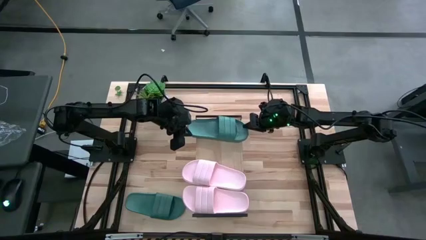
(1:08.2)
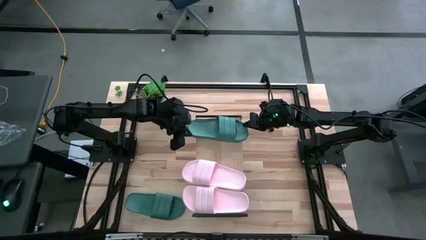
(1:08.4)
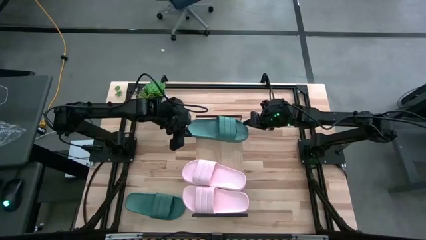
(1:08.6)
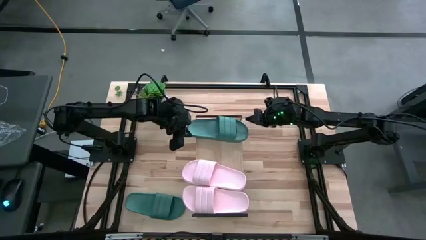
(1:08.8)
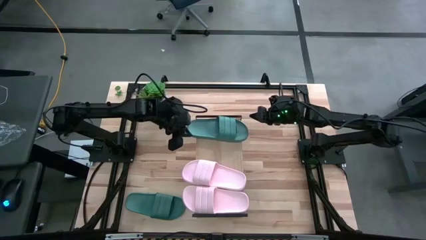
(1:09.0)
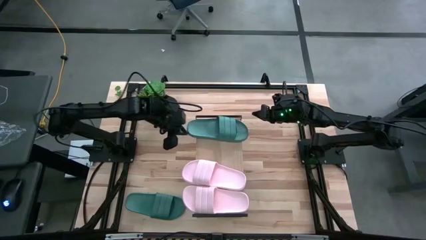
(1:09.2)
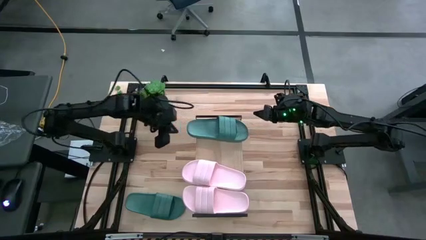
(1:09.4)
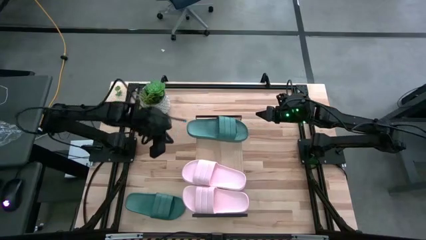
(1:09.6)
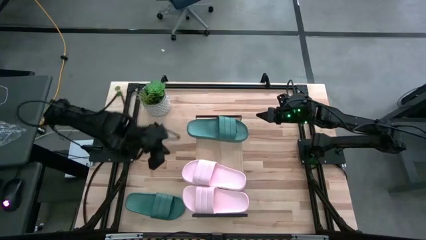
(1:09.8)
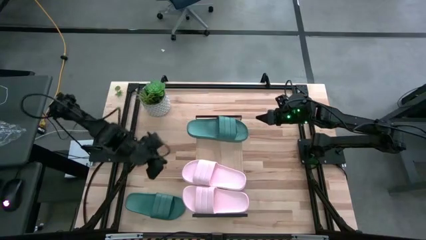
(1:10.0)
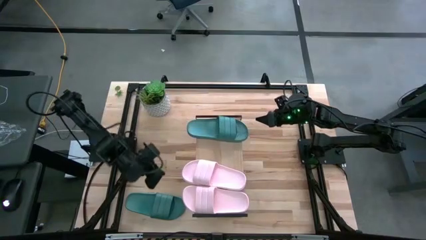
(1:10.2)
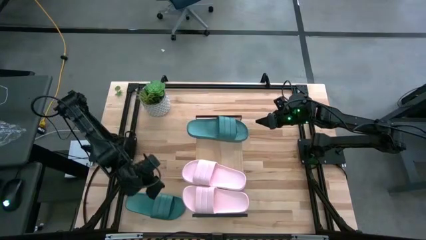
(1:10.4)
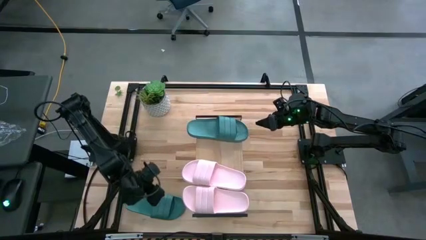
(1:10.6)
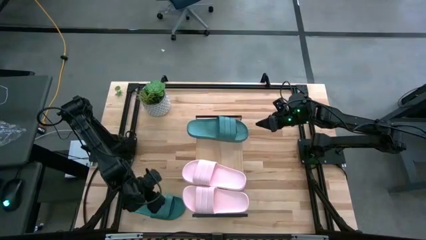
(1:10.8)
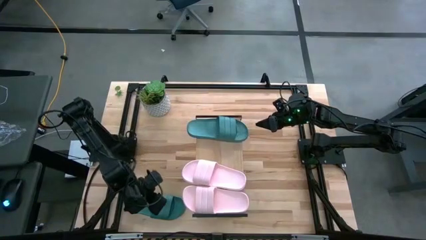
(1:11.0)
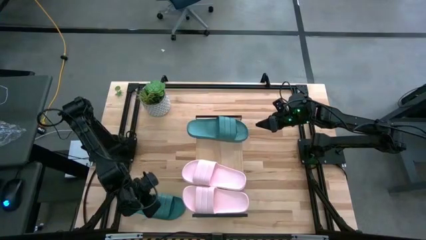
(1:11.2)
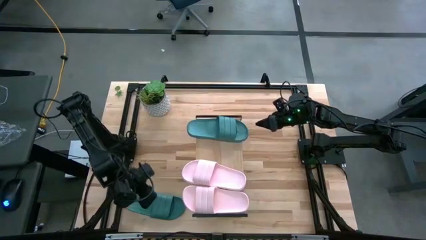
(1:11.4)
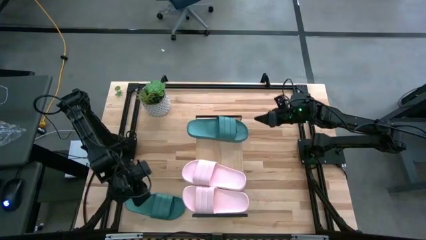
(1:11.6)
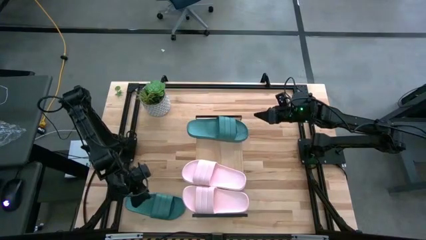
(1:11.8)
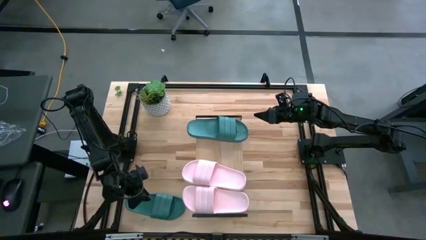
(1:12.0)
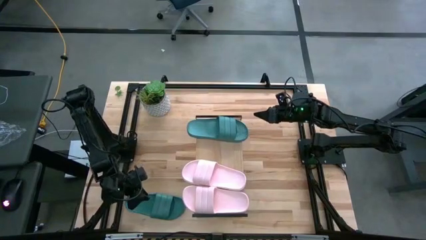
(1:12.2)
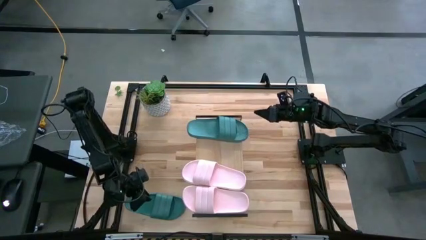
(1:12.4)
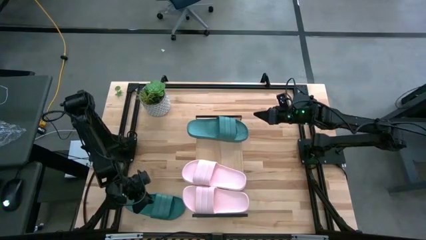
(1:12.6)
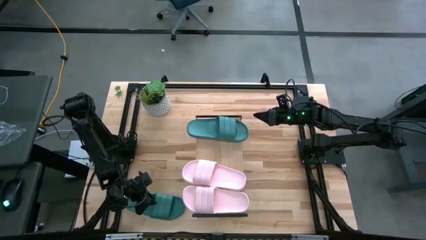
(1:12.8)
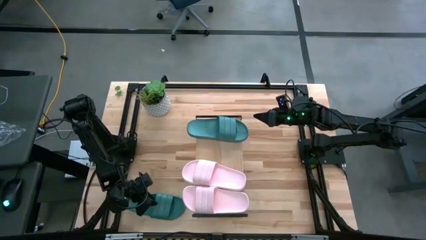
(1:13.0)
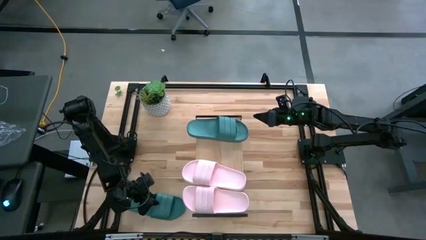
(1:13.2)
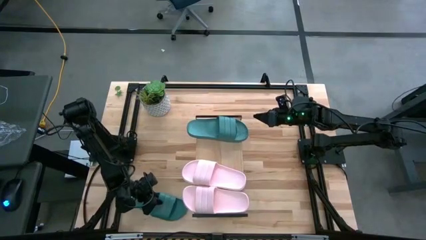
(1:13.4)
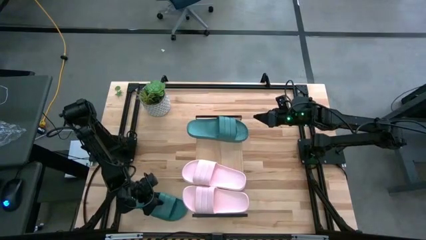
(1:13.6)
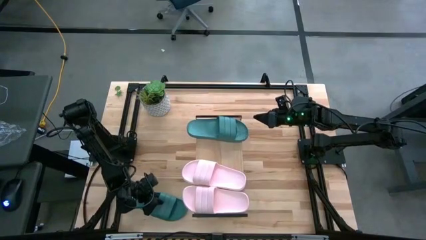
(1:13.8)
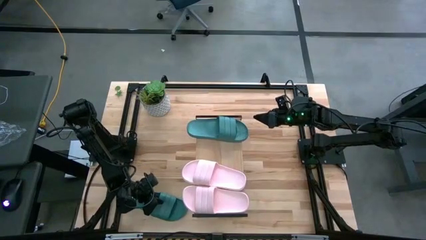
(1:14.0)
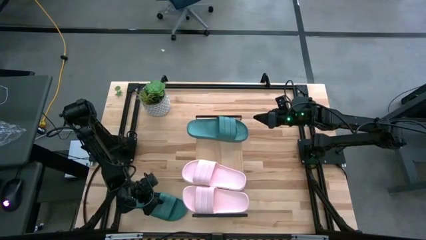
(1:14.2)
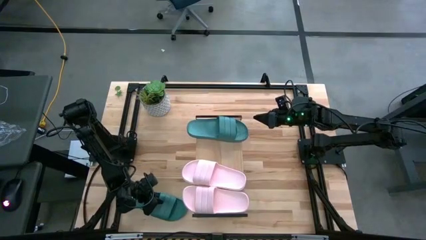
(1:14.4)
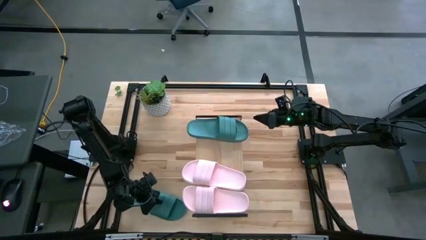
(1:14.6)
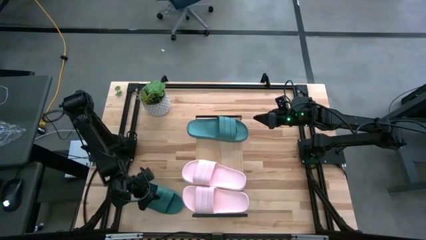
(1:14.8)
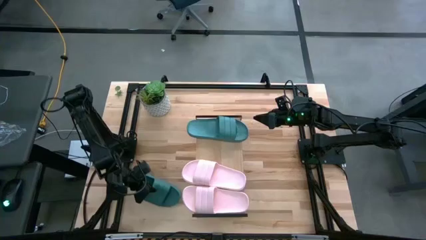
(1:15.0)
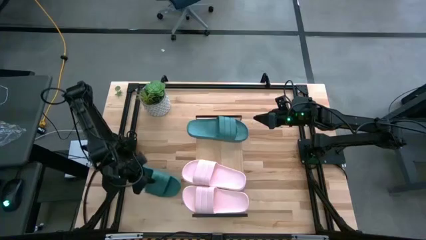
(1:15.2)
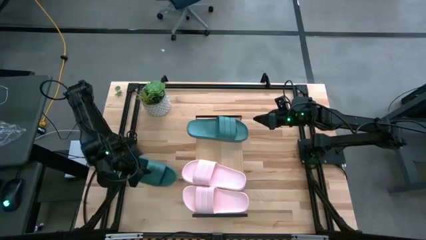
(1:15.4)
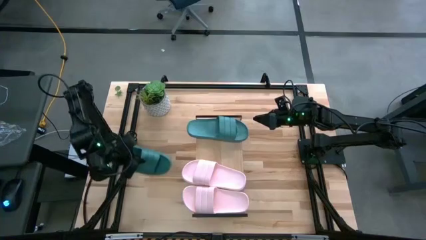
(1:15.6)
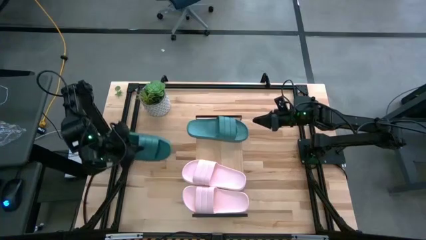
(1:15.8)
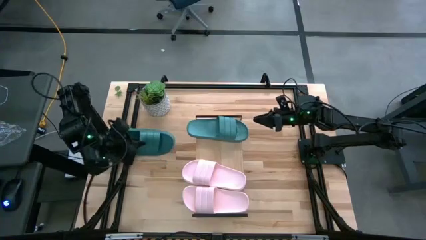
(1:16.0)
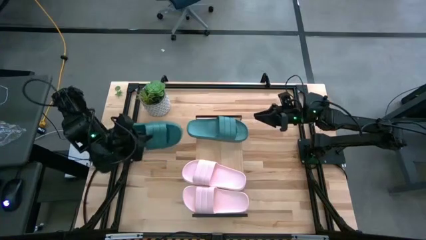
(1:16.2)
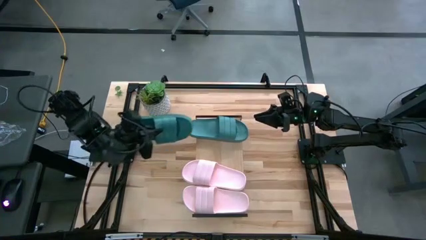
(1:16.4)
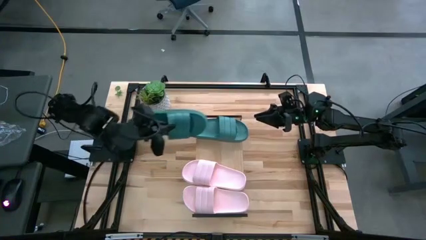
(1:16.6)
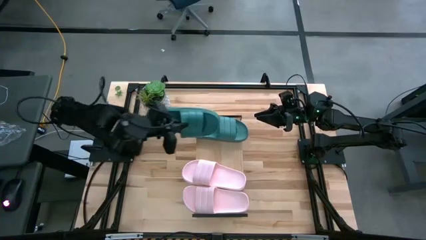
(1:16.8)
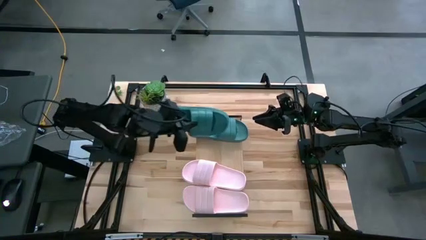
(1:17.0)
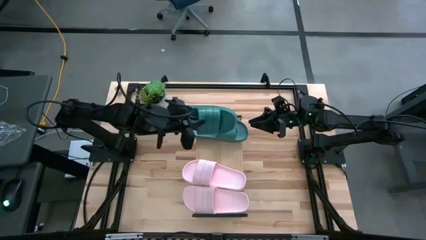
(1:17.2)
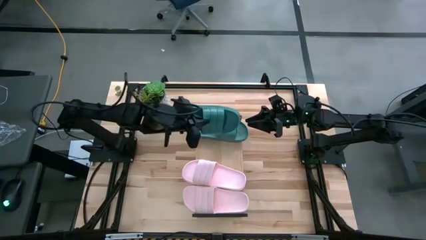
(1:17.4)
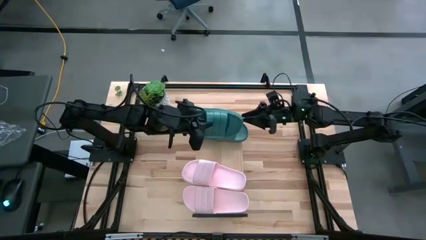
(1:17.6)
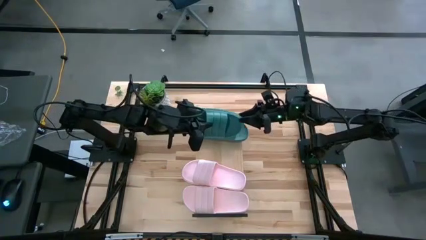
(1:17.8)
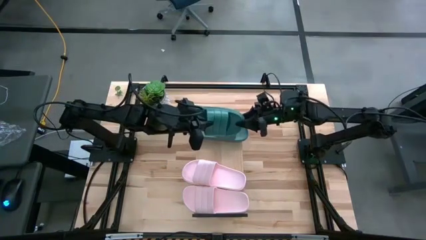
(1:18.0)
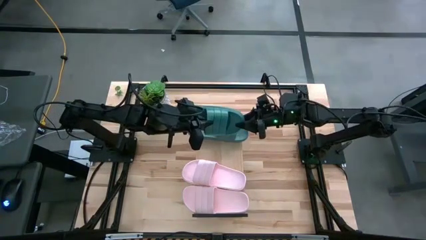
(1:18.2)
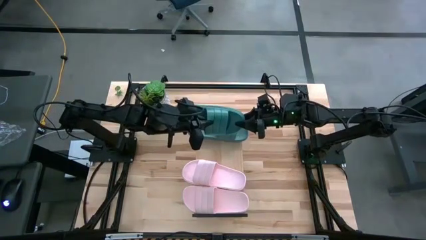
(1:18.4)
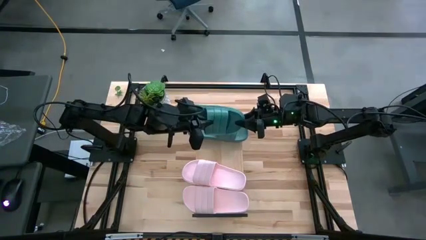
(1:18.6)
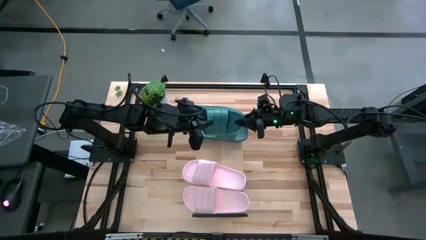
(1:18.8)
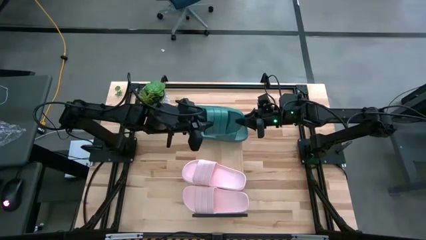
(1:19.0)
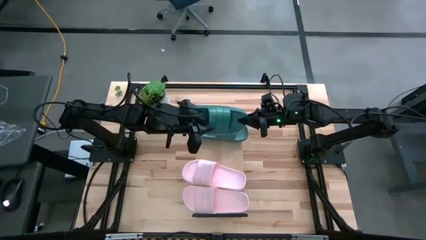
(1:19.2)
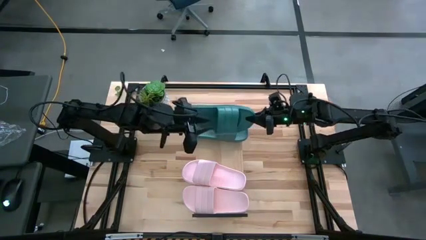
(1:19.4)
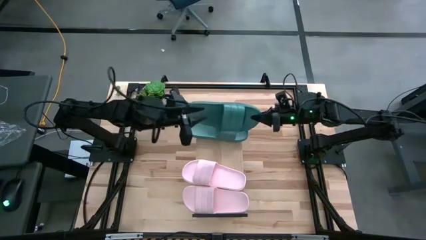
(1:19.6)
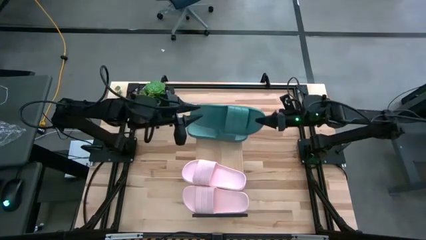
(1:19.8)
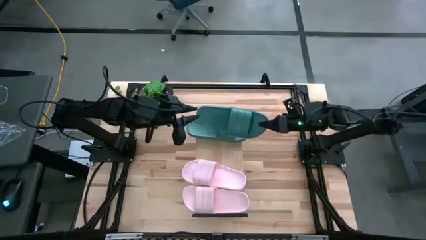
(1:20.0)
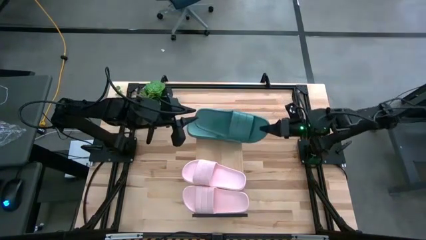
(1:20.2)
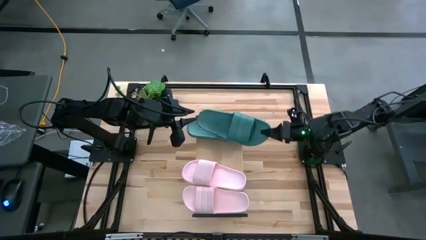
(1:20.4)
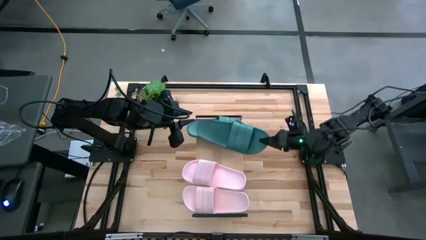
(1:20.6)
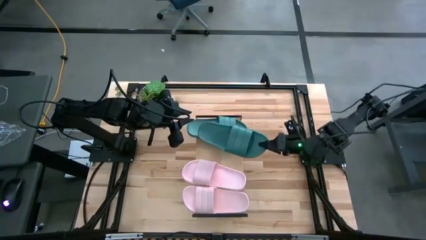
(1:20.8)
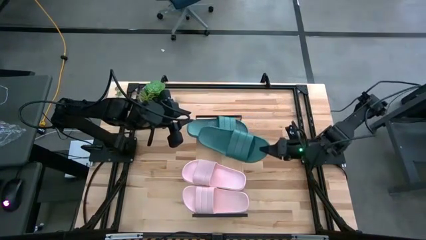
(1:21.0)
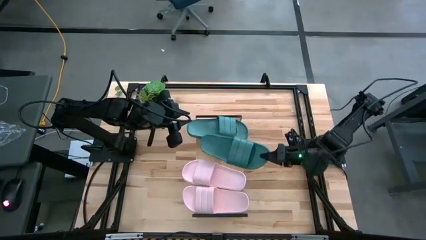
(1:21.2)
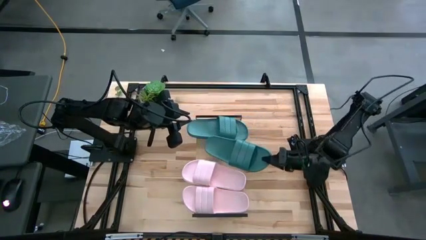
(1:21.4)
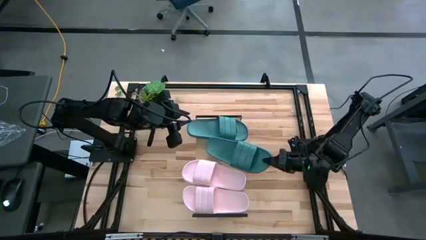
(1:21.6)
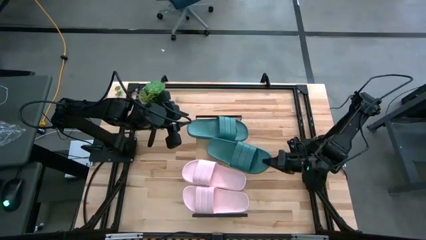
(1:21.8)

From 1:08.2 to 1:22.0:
Task: Pick and place slides into the shelf
Put the green slides on the shelf
